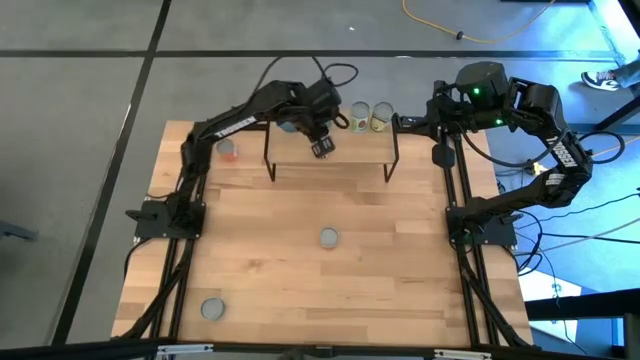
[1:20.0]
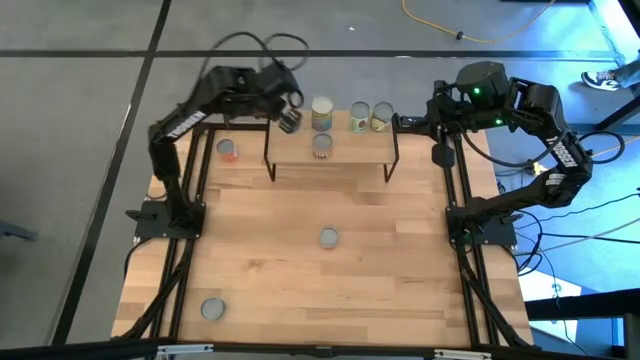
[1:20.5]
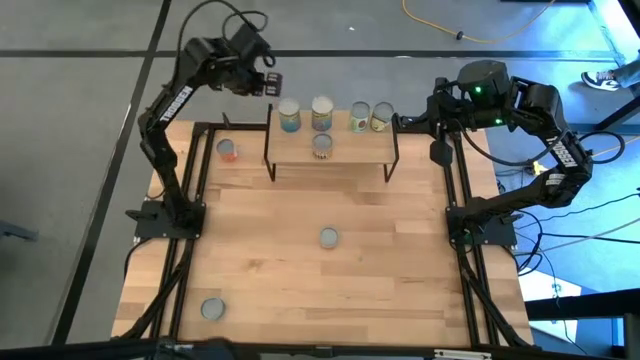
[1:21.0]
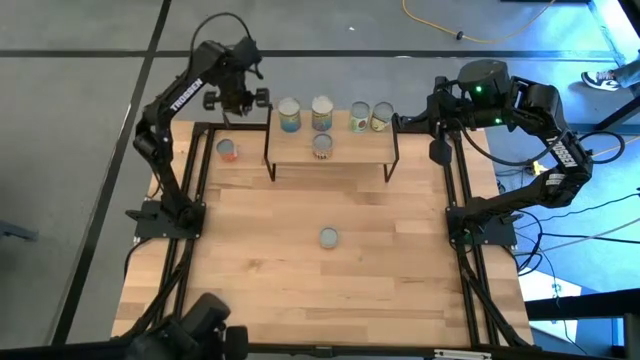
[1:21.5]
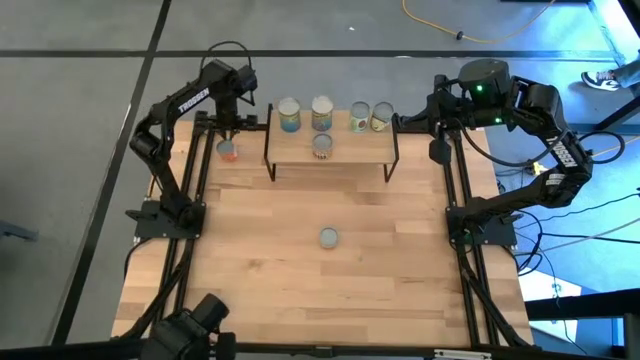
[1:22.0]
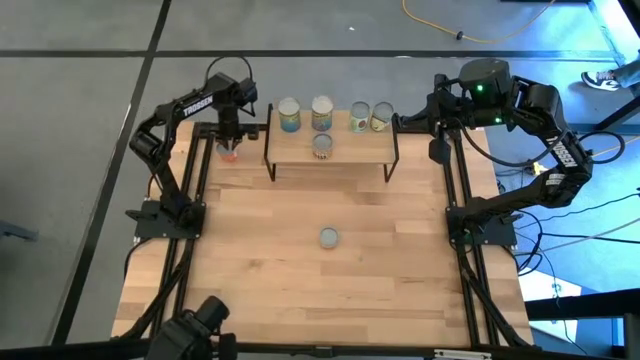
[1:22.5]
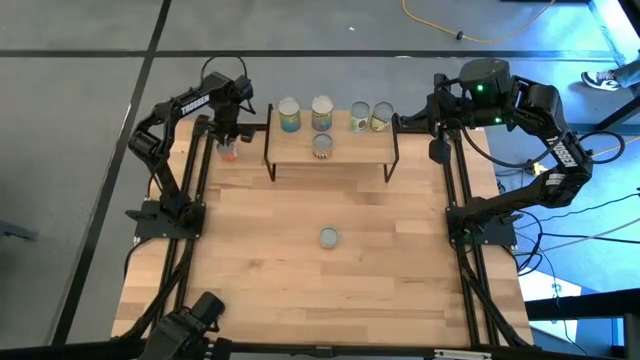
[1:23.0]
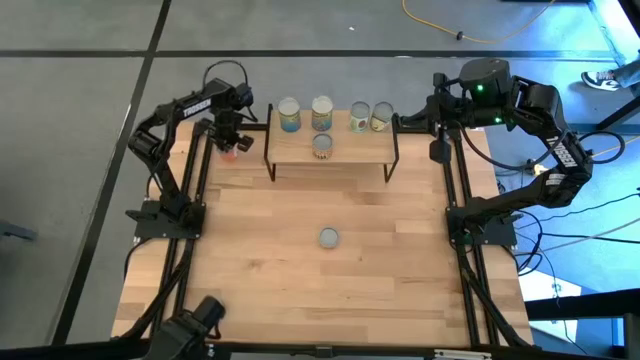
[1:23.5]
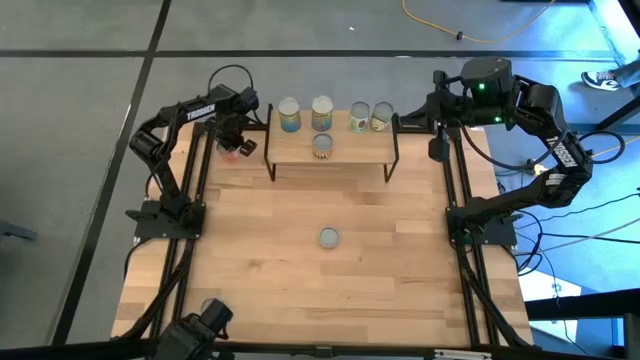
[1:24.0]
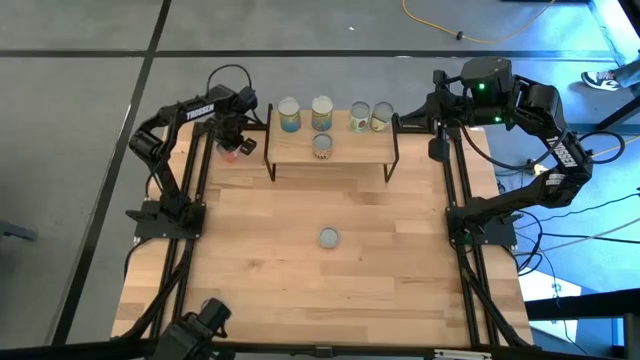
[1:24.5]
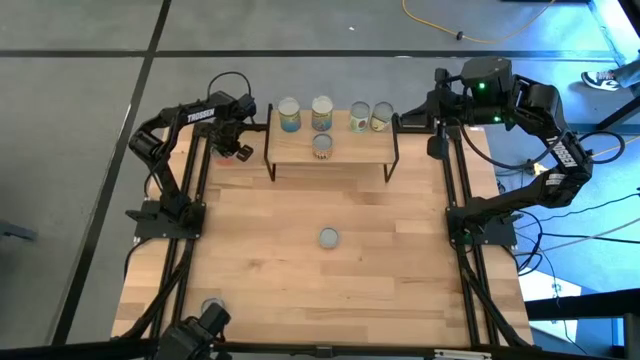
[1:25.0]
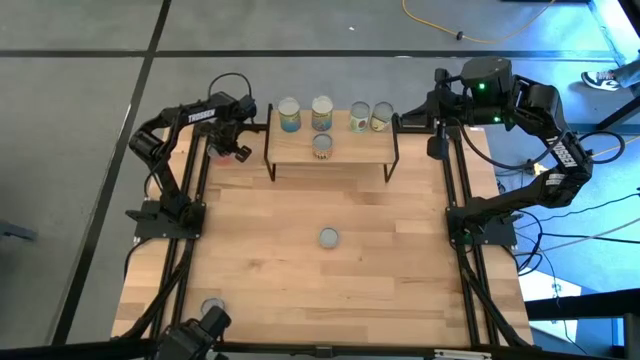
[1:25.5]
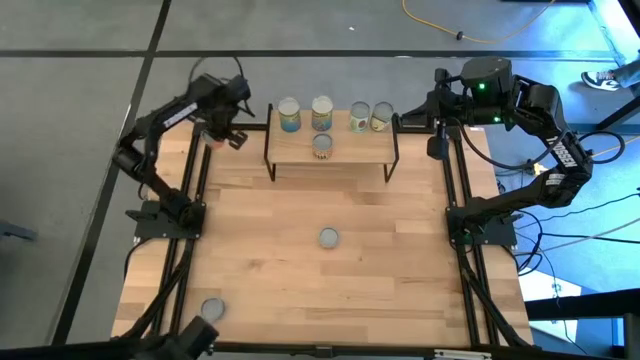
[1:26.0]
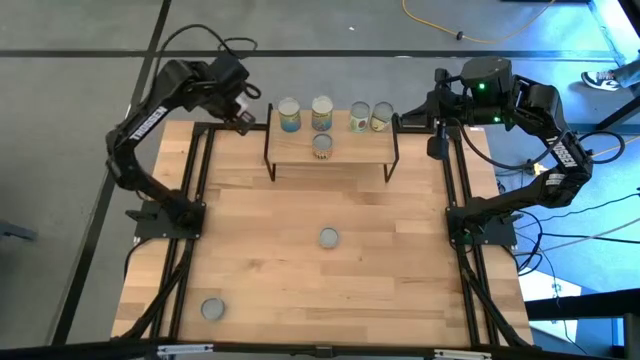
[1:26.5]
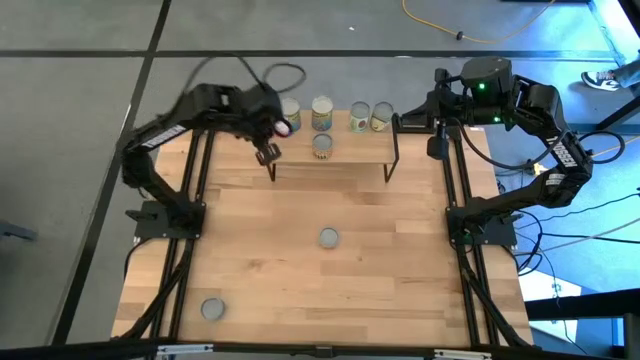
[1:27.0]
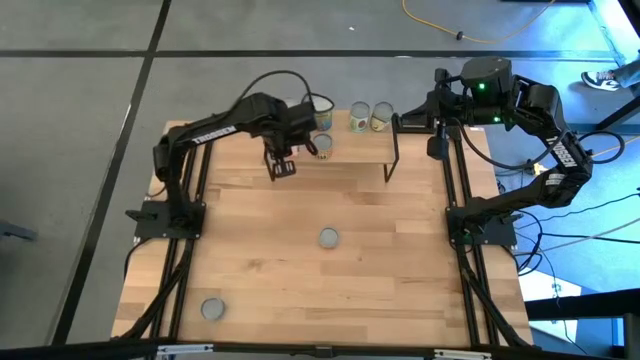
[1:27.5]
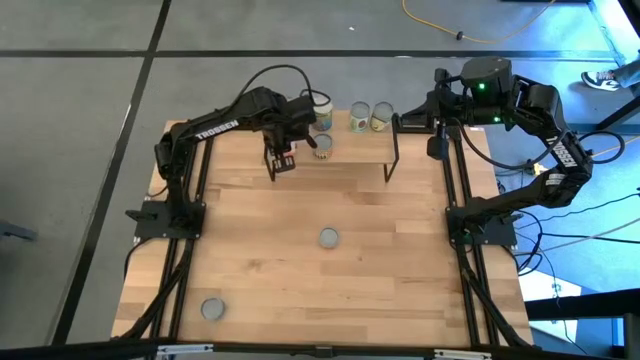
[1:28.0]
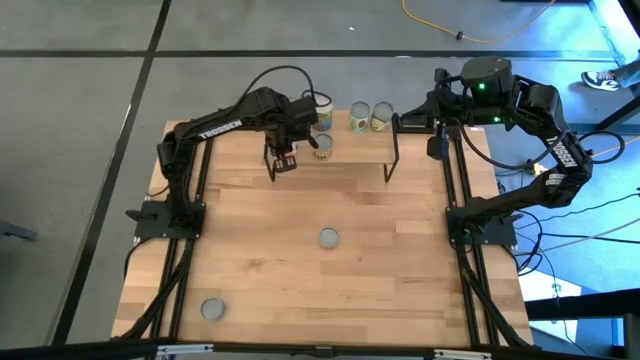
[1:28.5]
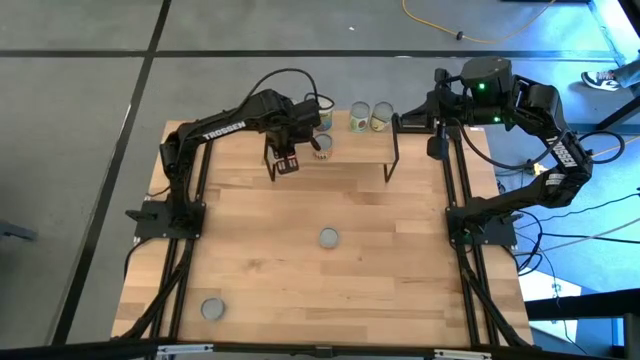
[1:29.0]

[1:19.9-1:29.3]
Task: Pick and place cans onto a shelf
Put the canned tomato sauce on the shelf

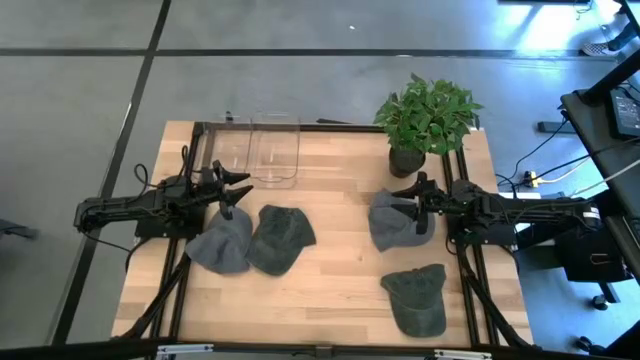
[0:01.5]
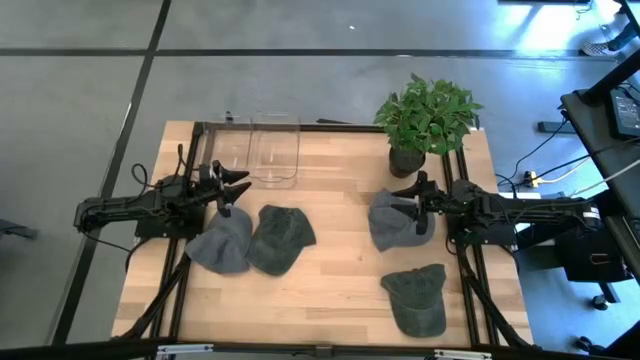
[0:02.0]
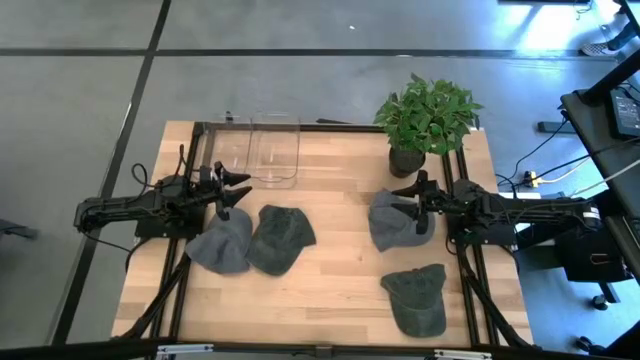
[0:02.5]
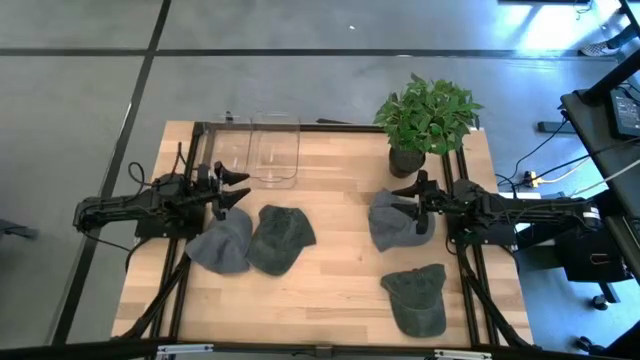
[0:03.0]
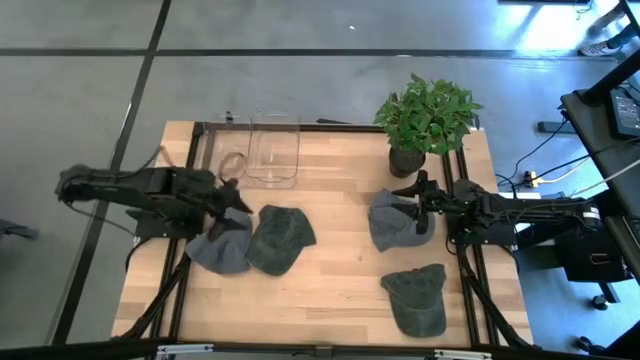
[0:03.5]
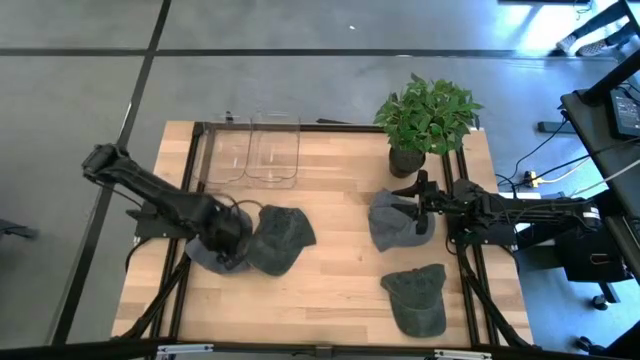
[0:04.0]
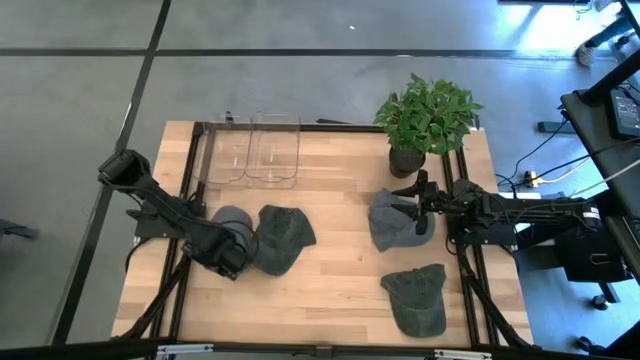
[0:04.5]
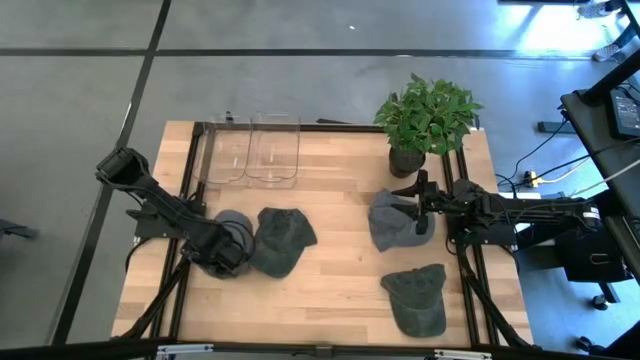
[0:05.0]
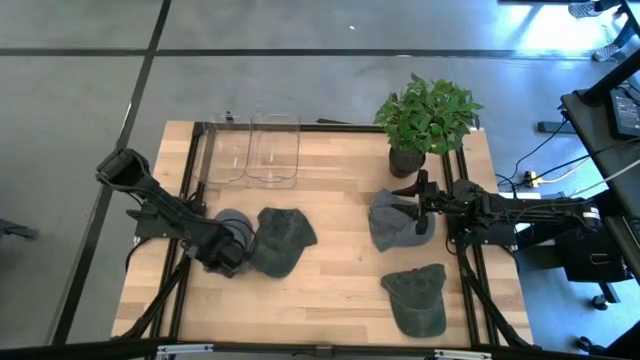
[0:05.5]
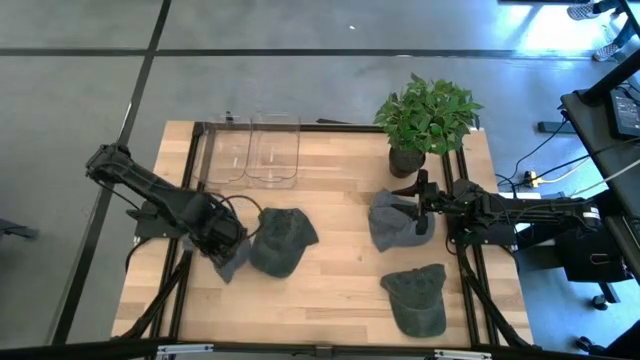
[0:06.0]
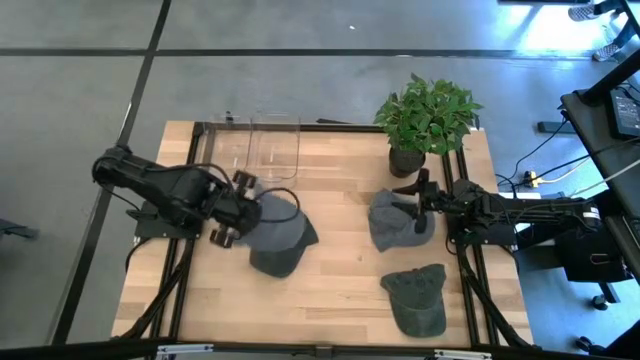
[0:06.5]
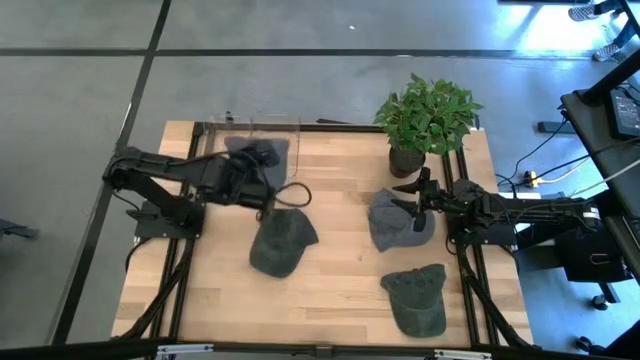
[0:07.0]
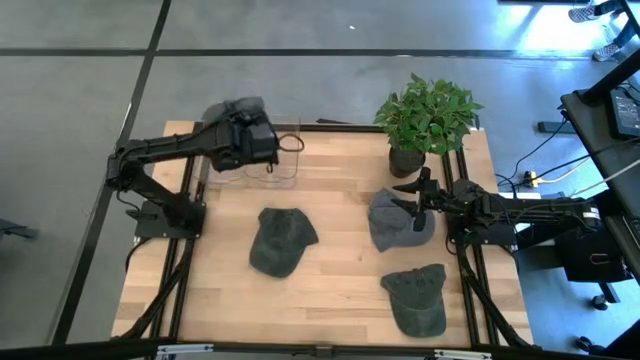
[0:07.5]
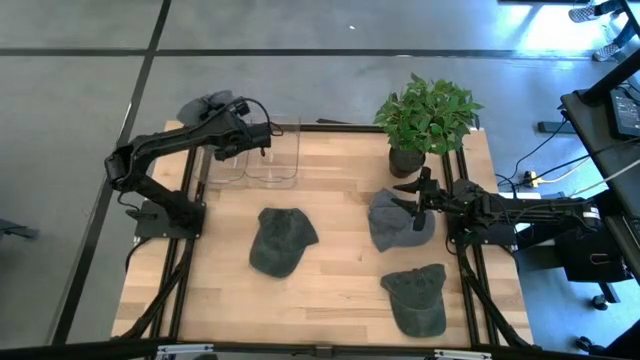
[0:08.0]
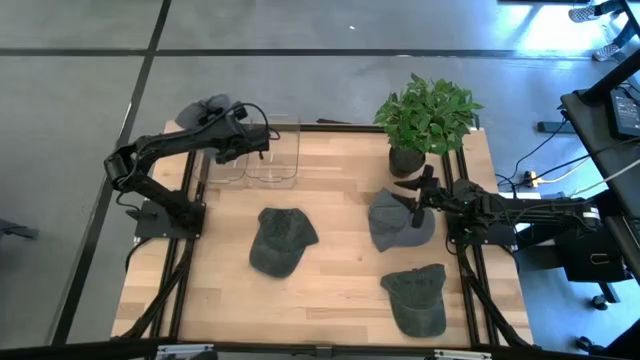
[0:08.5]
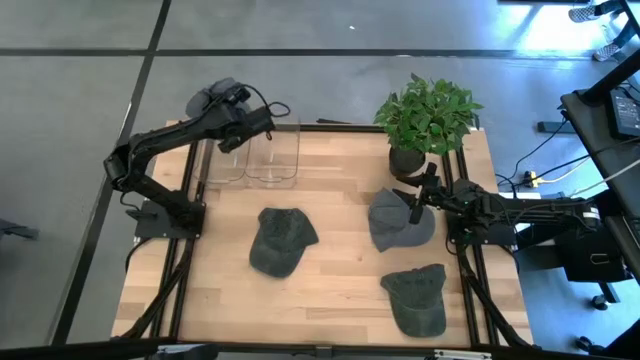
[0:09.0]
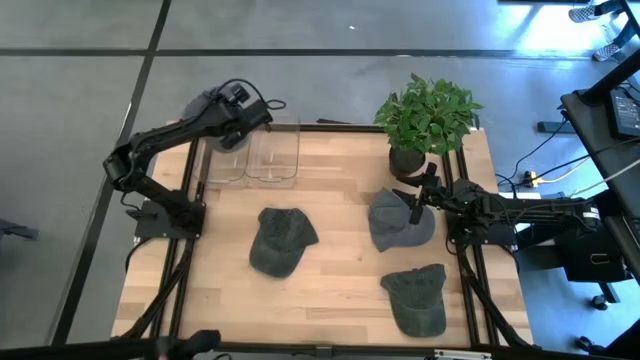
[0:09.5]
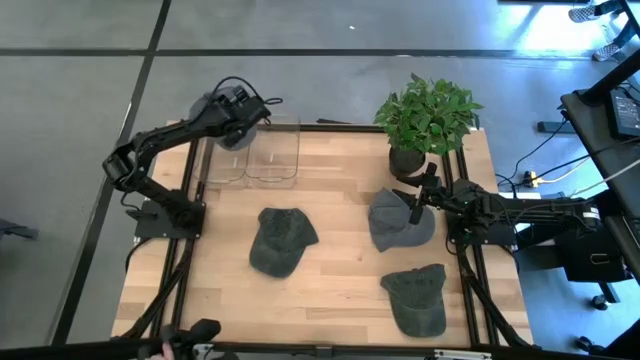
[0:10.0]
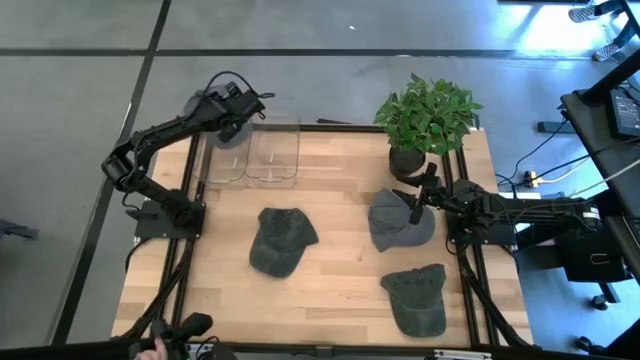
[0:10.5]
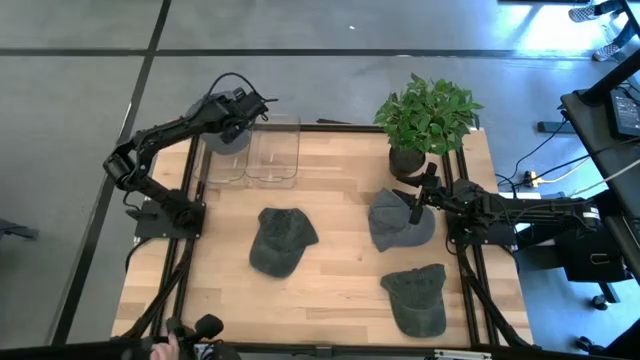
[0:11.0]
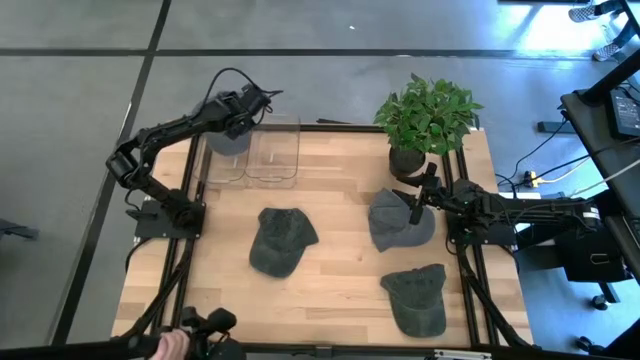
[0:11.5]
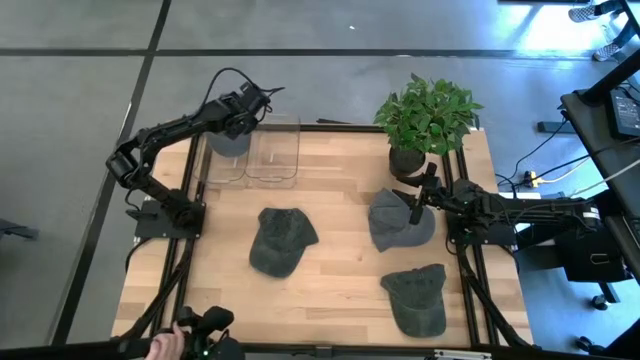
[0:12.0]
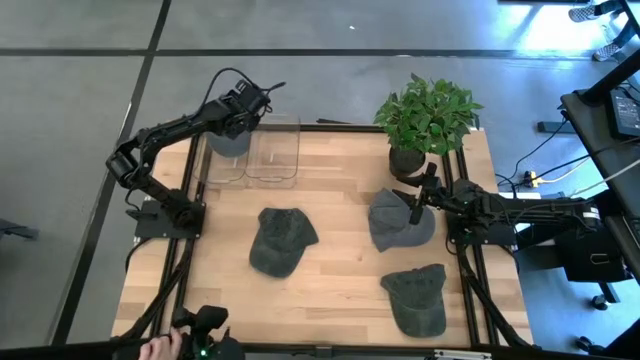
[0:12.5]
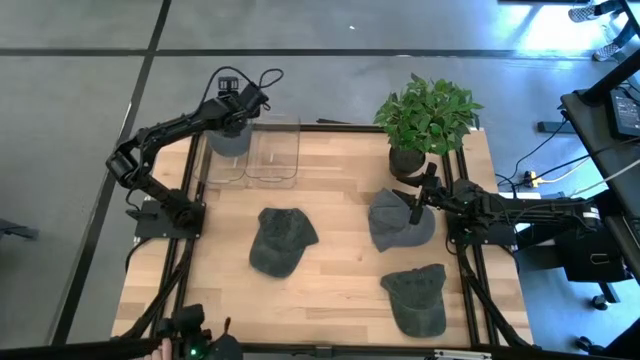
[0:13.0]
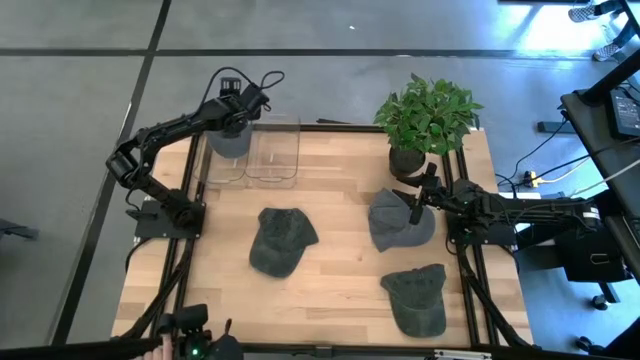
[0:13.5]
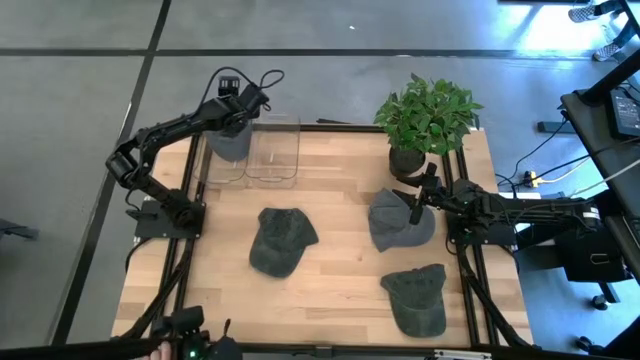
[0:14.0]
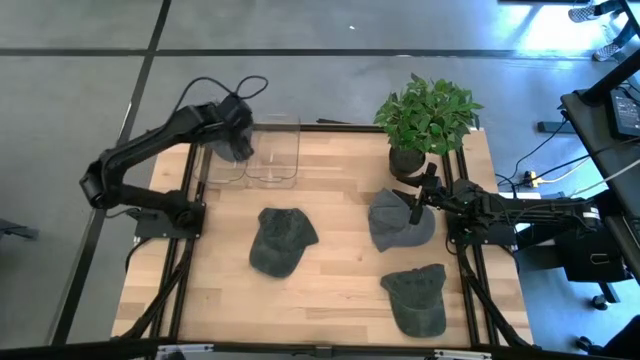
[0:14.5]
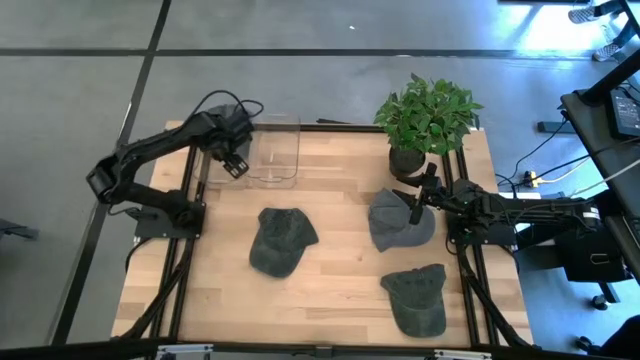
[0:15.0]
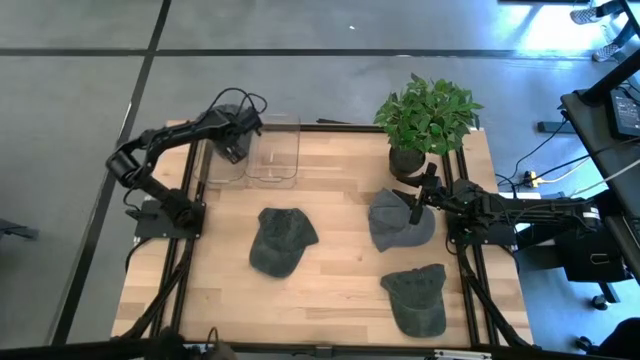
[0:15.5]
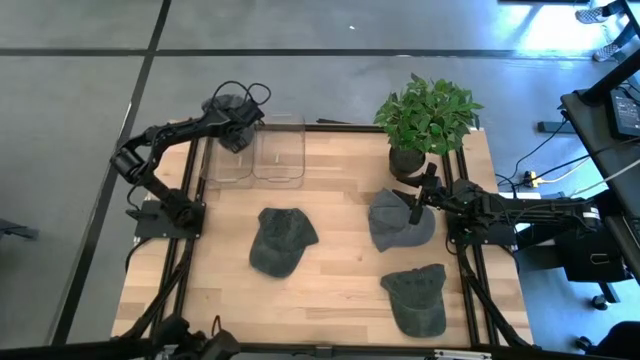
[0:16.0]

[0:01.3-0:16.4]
Task: Pick & Place hat
Put the left gray cap into the left transparent bin
